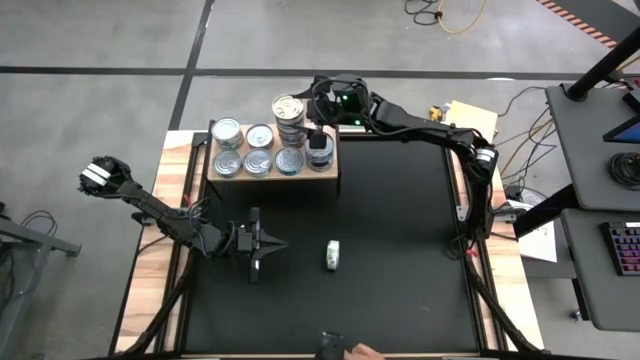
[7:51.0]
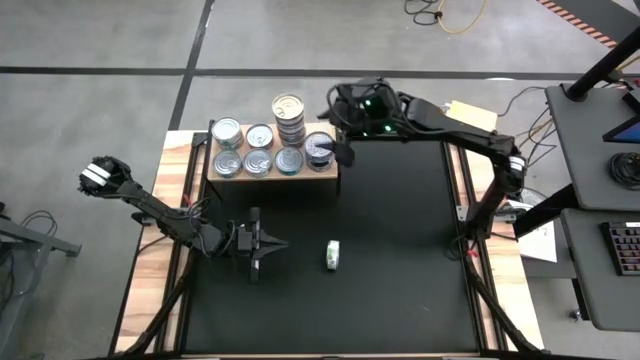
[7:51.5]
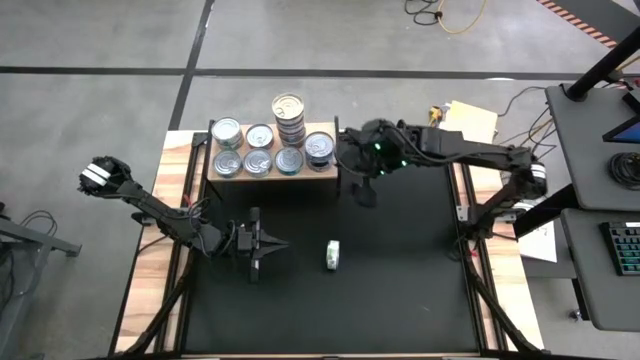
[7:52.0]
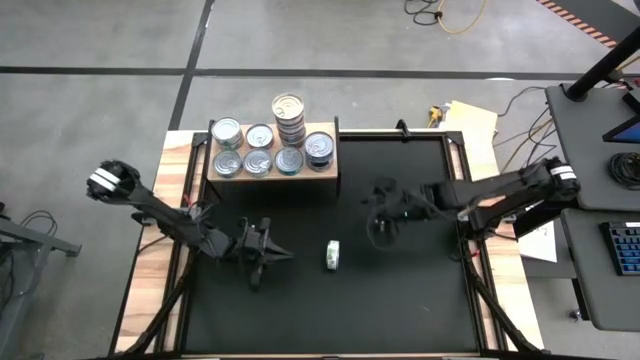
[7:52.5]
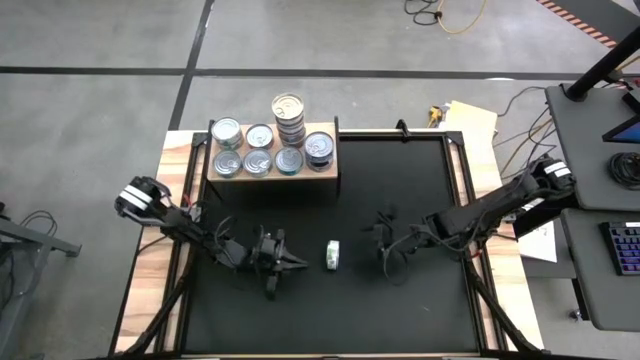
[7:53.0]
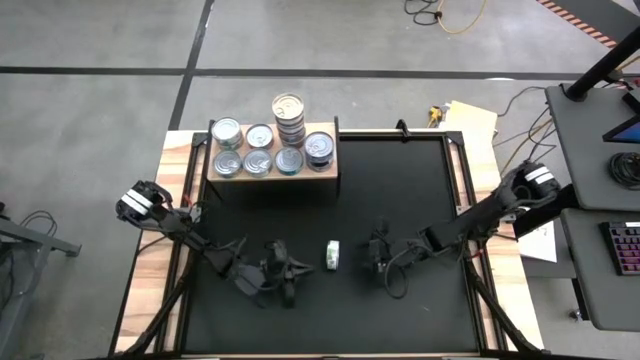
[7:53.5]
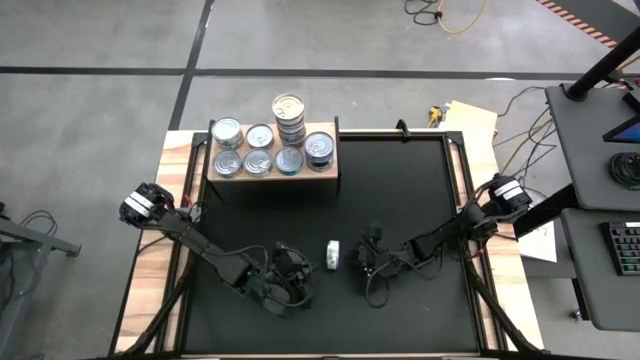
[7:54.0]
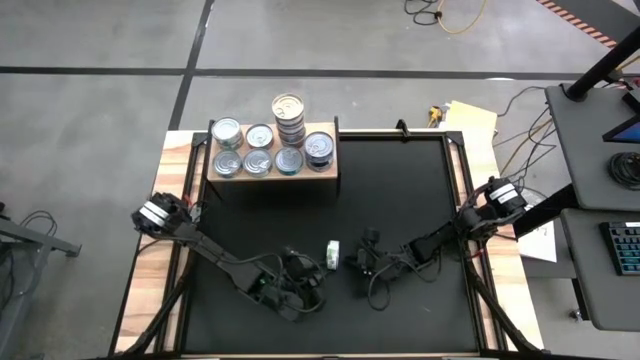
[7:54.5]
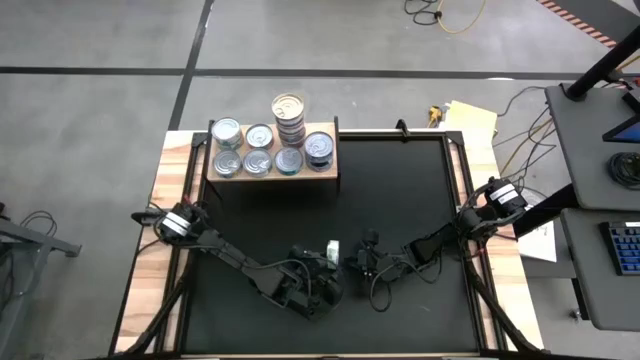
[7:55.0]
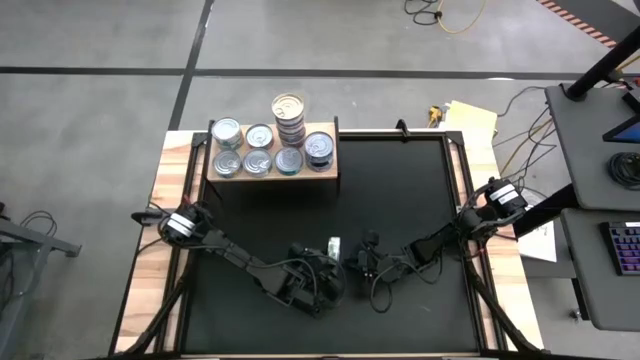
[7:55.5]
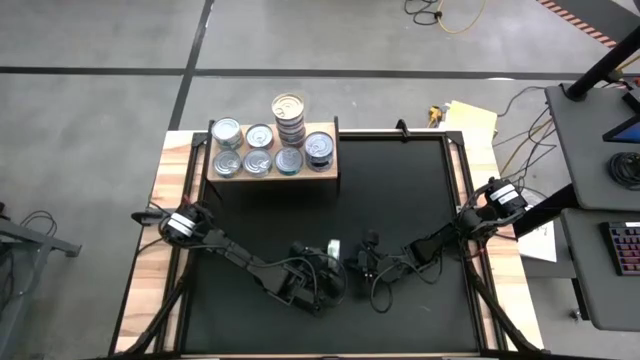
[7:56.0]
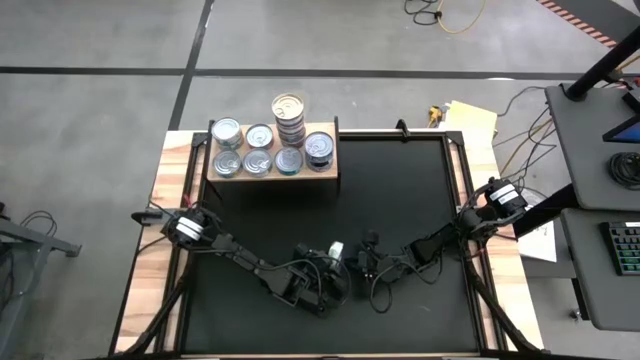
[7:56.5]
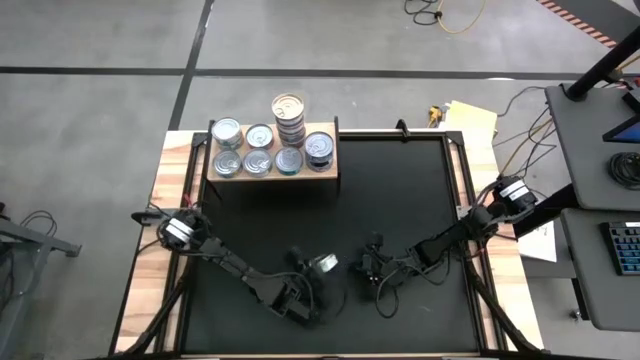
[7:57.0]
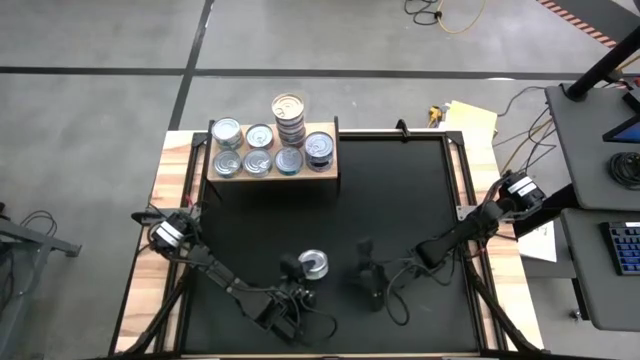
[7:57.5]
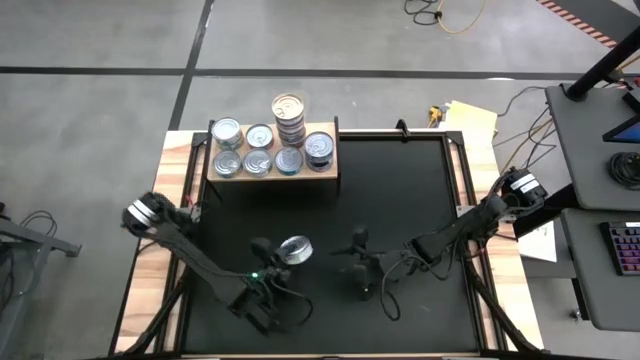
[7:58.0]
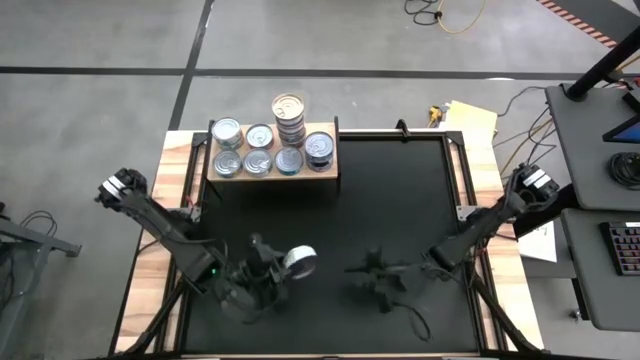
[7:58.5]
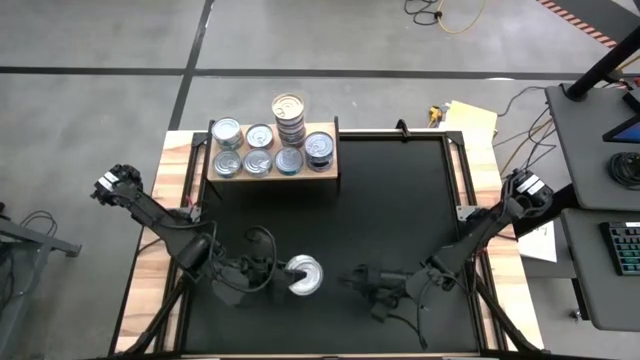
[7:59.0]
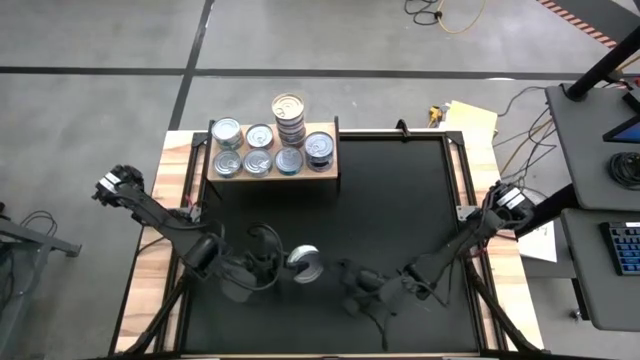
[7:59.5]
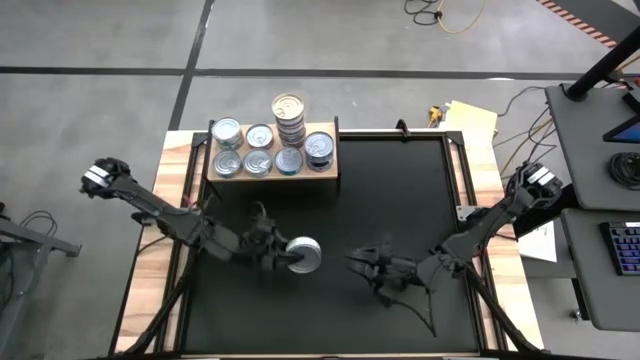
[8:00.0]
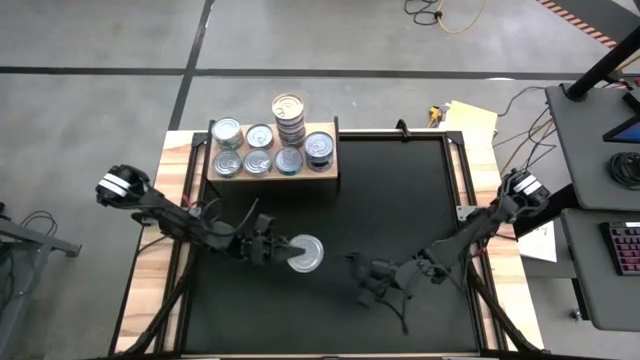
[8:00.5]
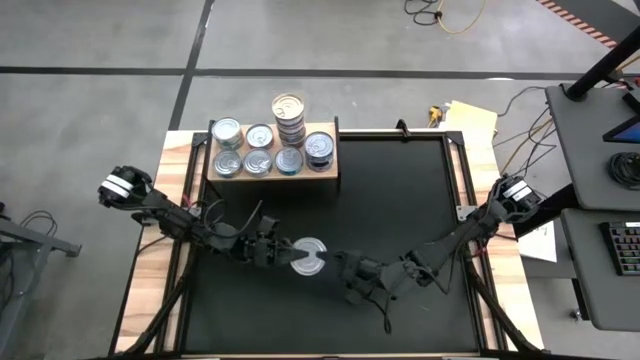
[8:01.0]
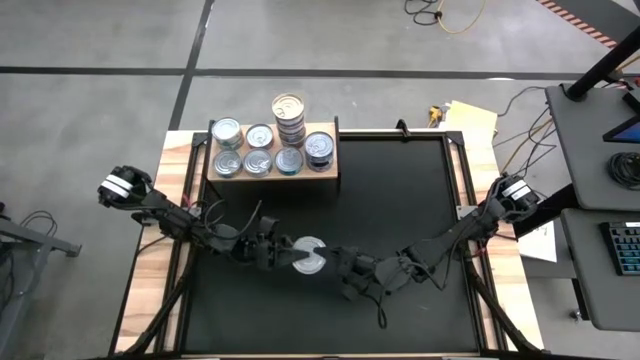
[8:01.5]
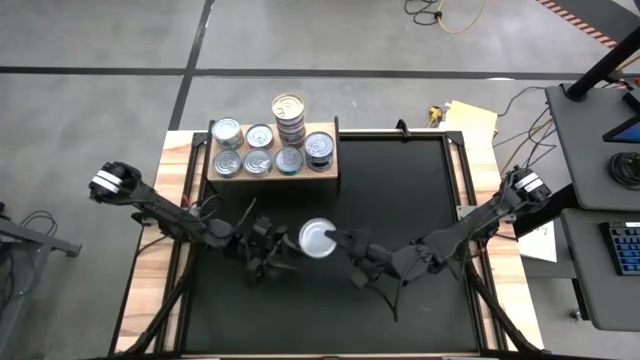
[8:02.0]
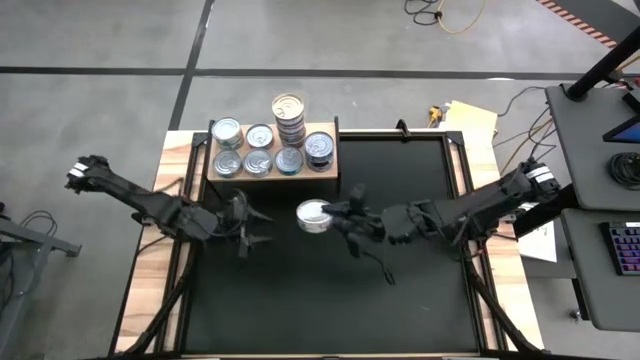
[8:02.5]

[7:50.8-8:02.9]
Task: Stack canned seafood by type on shelf
Stack the green/white tuna can on top of the other green/white tuna can on the shelf

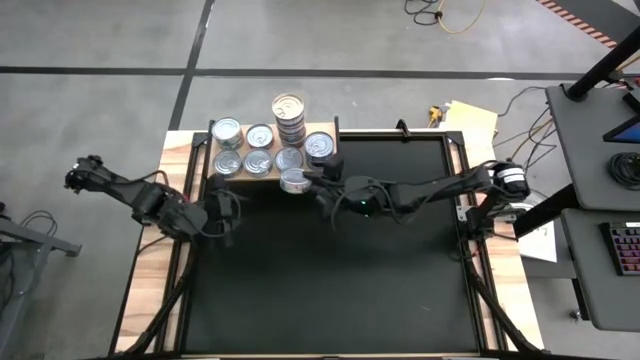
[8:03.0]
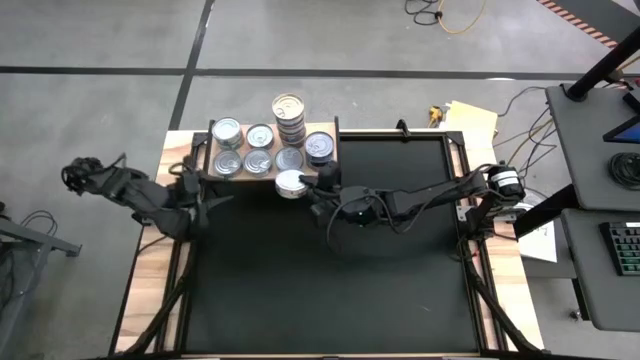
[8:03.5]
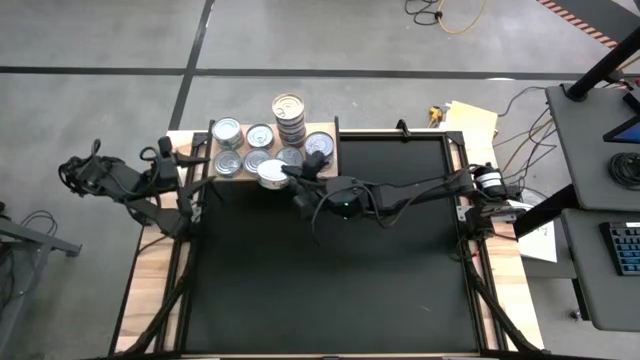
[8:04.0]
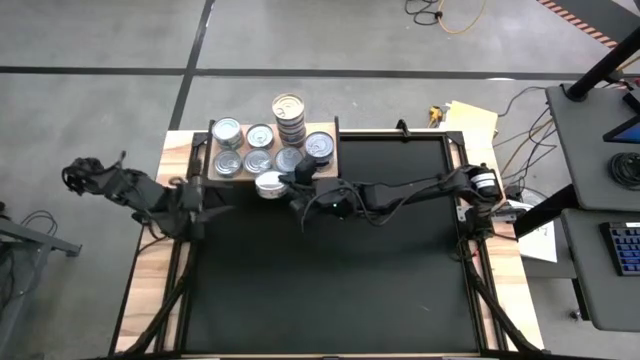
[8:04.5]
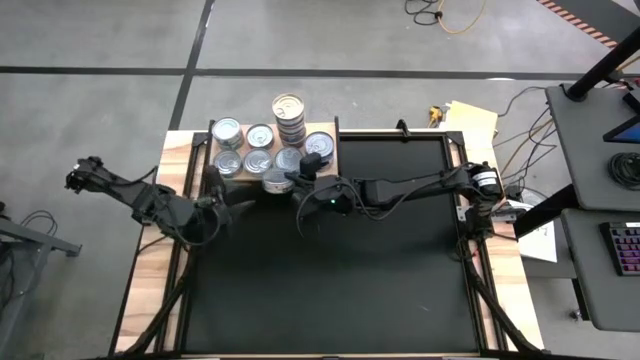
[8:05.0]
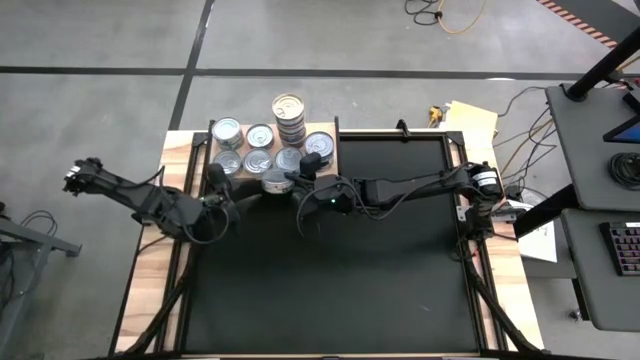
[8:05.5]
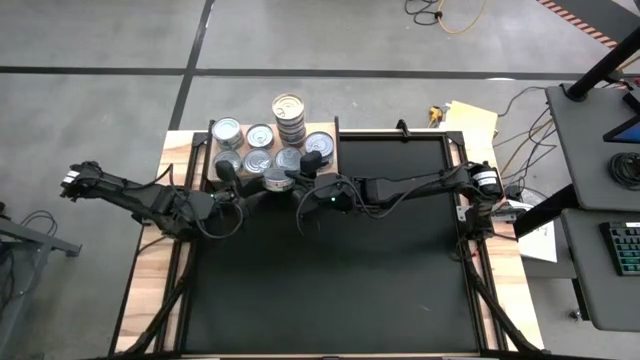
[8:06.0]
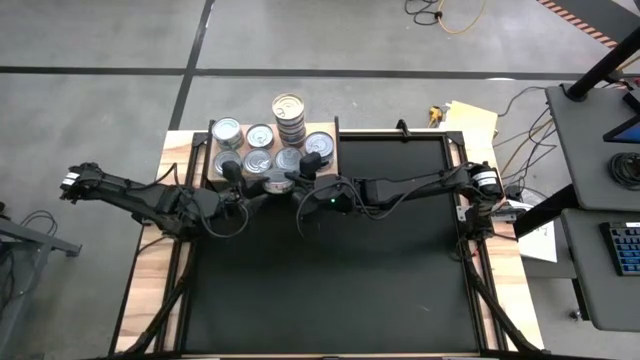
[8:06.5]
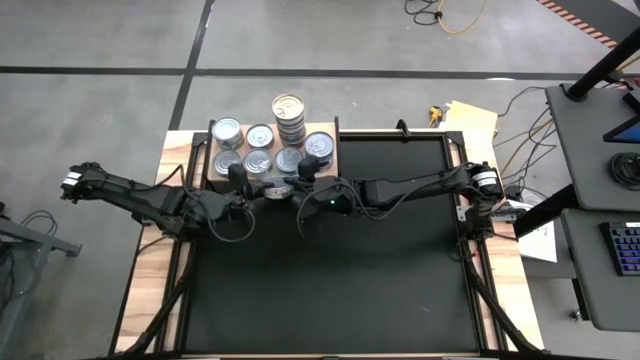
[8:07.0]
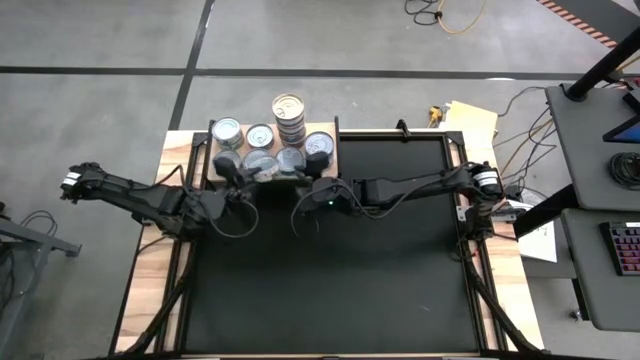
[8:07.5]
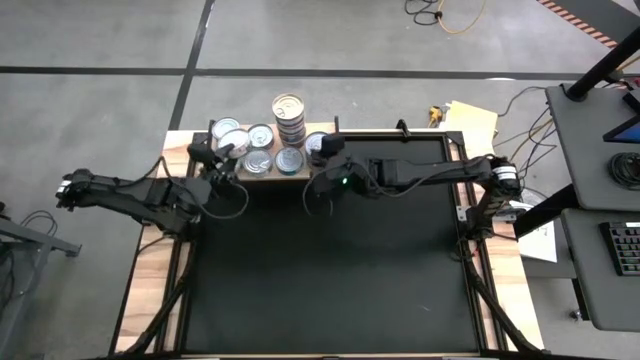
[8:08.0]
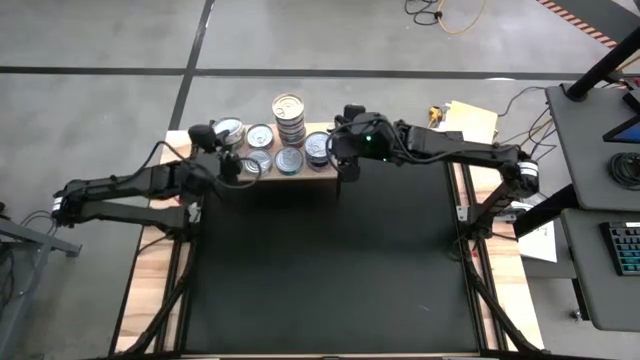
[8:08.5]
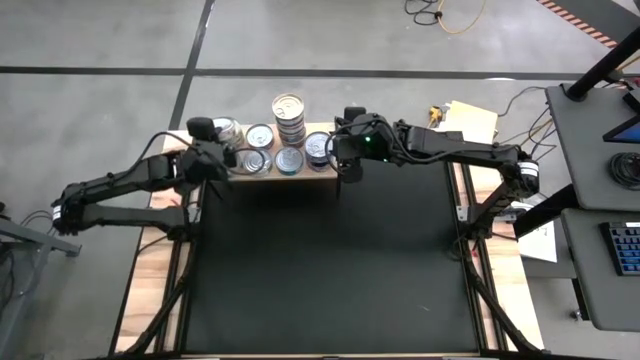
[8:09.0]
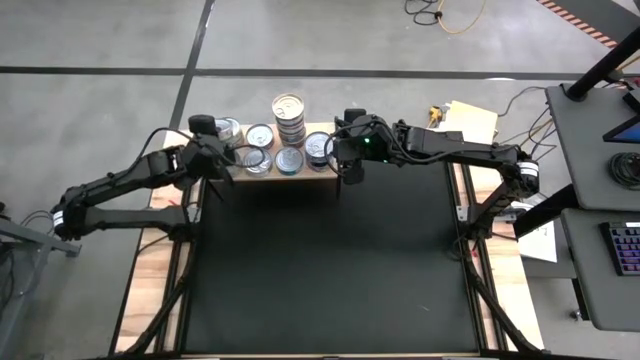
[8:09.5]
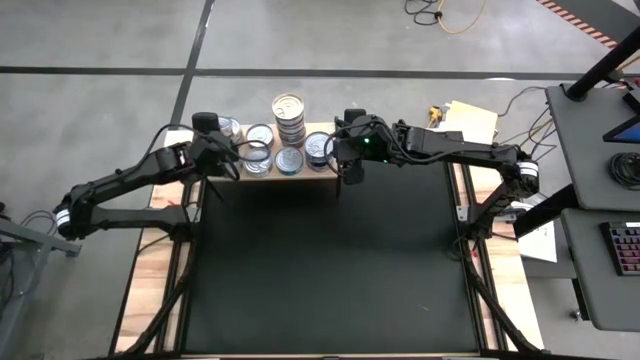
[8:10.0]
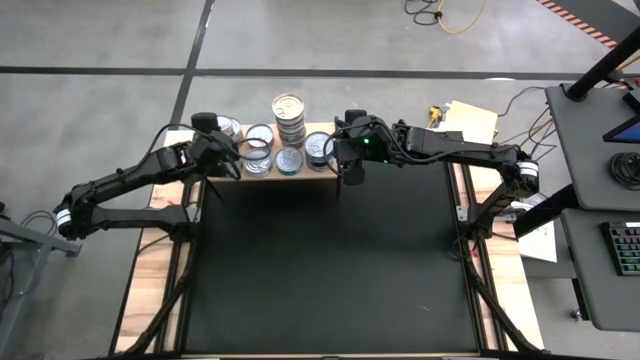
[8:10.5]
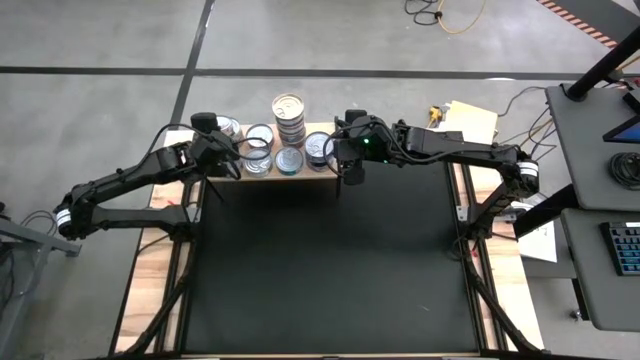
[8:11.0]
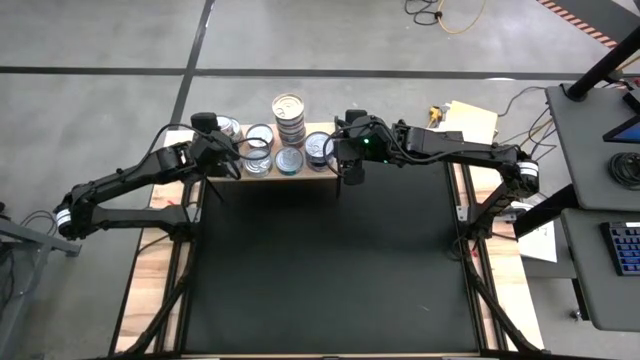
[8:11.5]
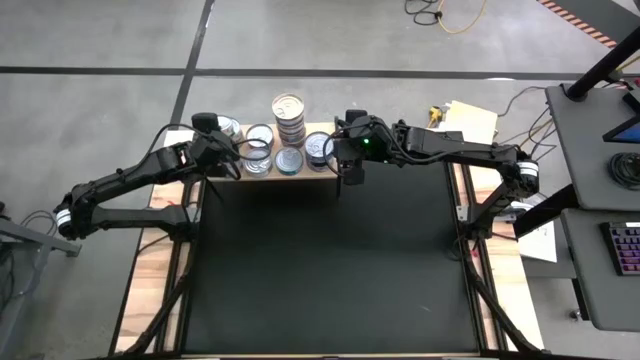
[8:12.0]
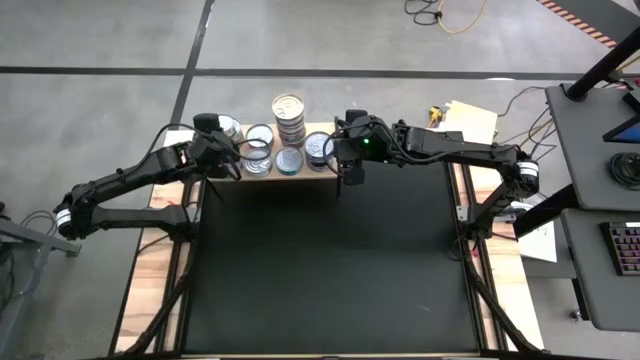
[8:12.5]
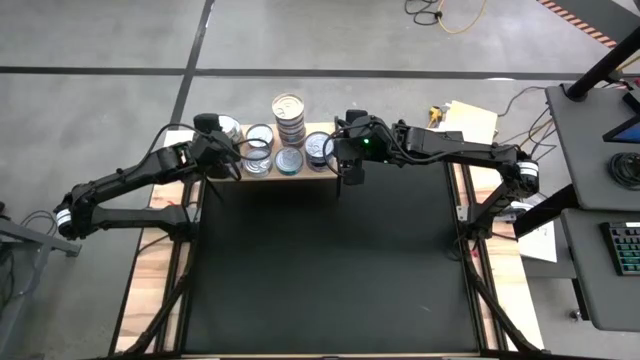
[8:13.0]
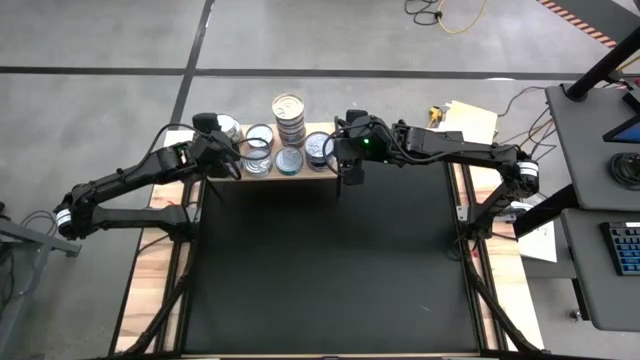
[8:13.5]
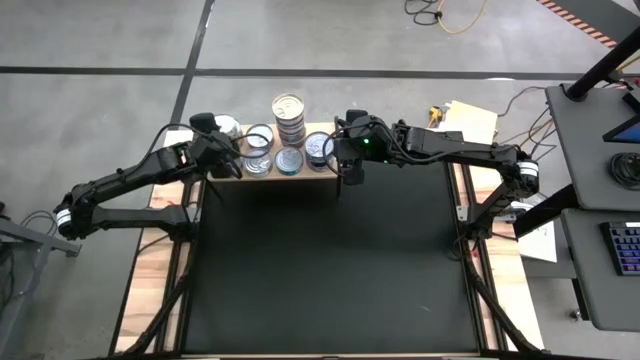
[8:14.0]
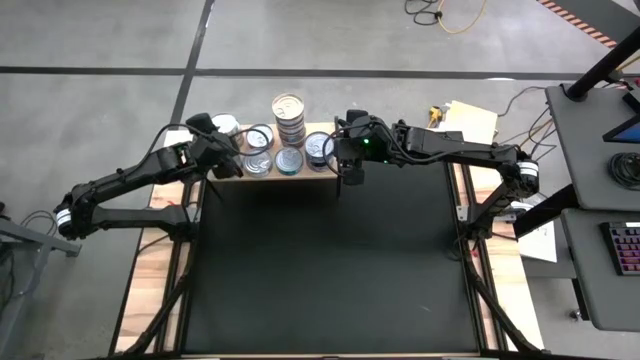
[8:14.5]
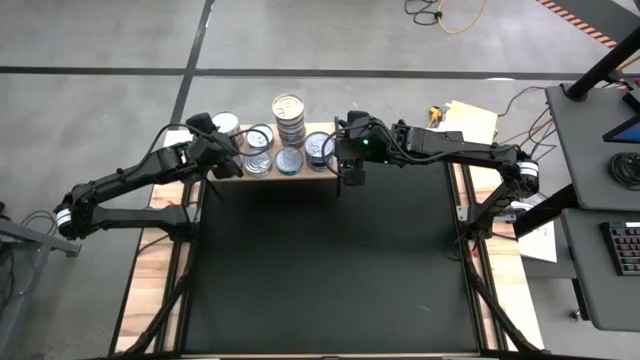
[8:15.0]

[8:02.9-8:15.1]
Stack the green/white tuna can on top of the other green/white tuna can on the shelf
